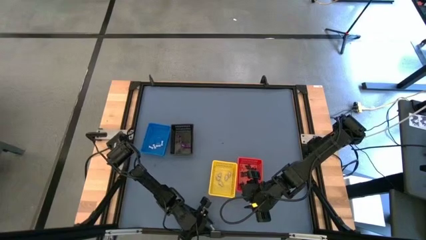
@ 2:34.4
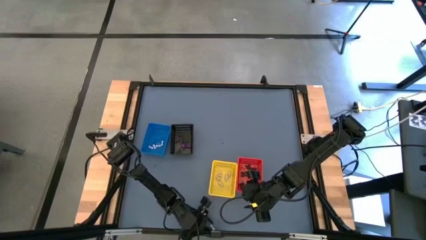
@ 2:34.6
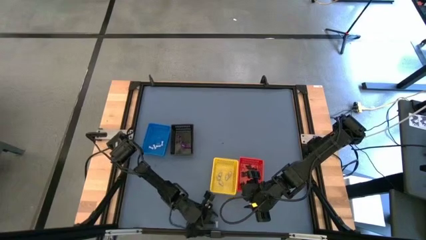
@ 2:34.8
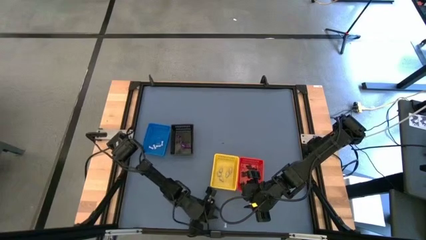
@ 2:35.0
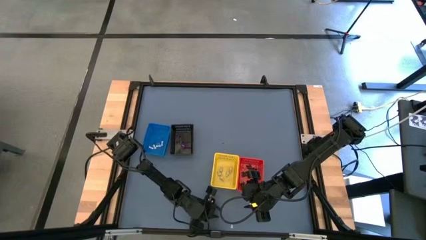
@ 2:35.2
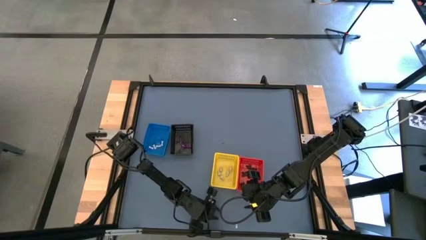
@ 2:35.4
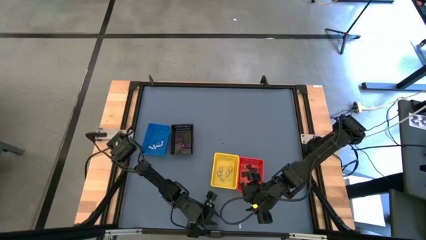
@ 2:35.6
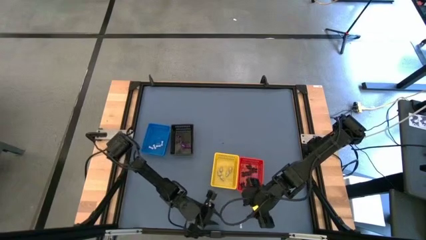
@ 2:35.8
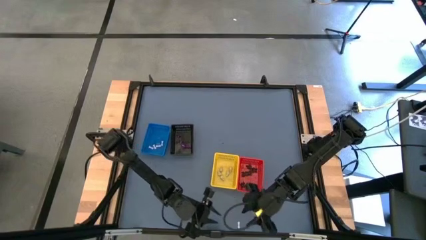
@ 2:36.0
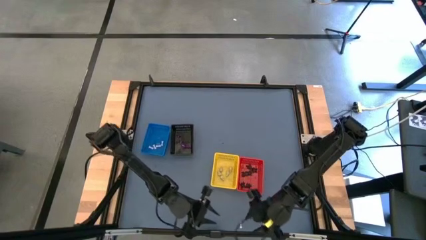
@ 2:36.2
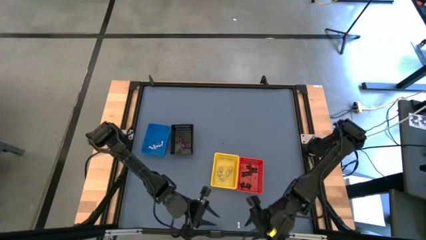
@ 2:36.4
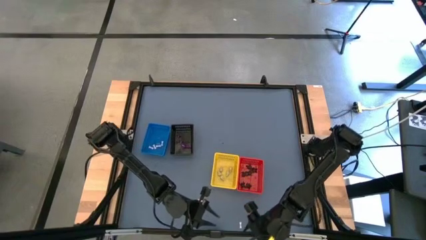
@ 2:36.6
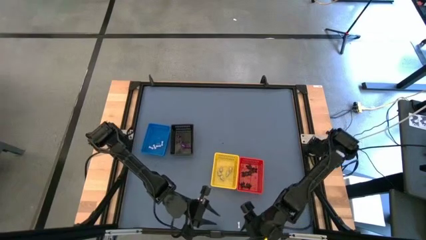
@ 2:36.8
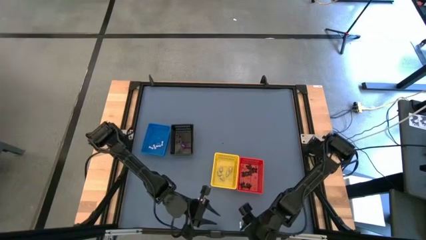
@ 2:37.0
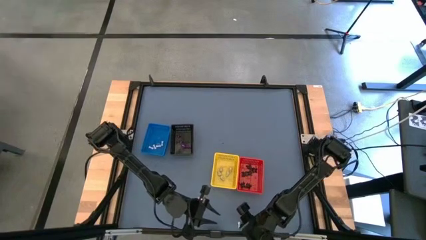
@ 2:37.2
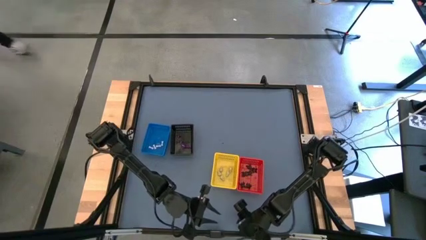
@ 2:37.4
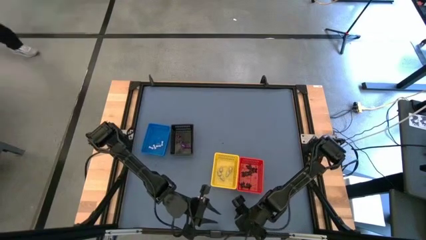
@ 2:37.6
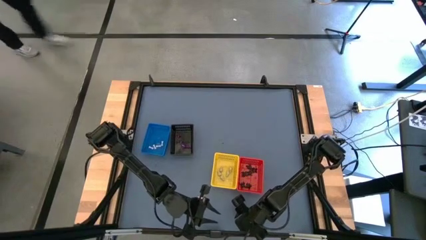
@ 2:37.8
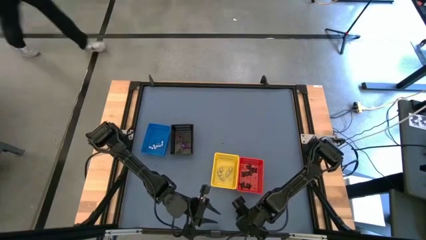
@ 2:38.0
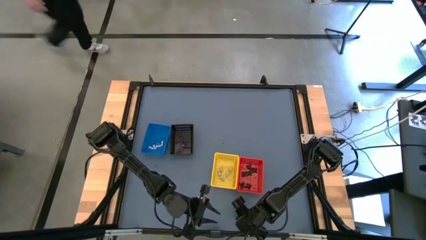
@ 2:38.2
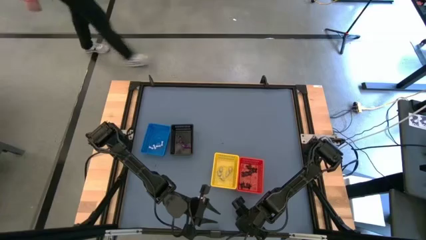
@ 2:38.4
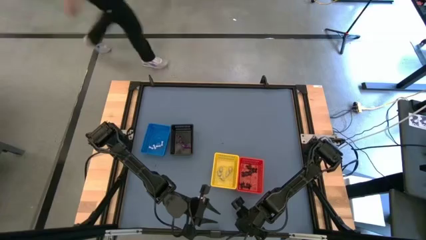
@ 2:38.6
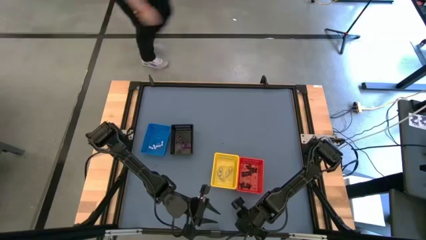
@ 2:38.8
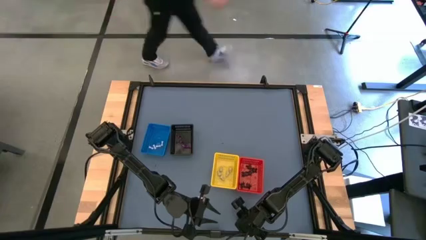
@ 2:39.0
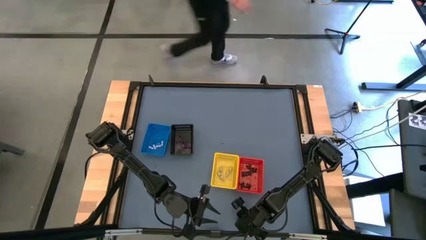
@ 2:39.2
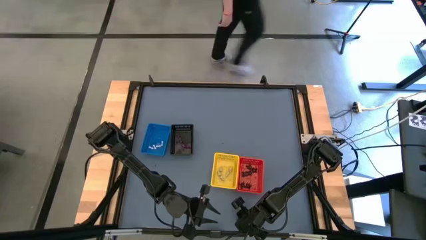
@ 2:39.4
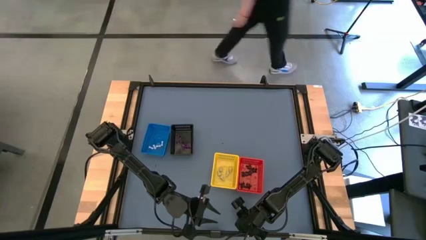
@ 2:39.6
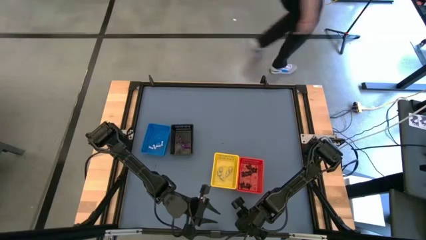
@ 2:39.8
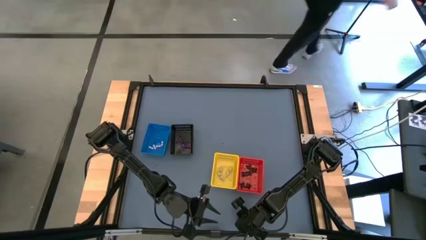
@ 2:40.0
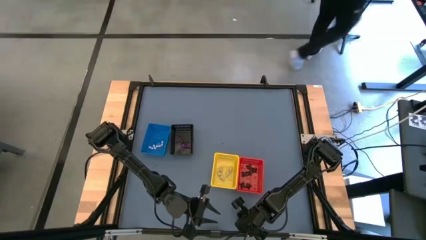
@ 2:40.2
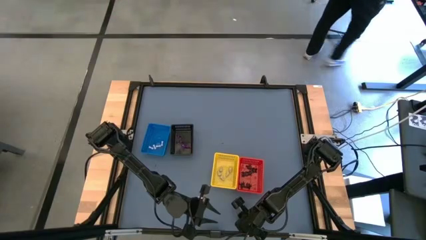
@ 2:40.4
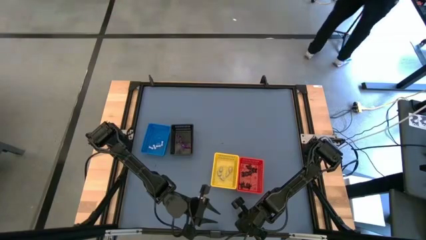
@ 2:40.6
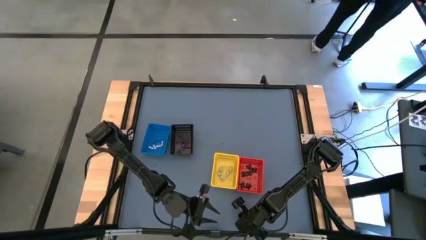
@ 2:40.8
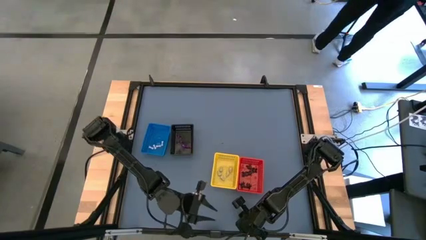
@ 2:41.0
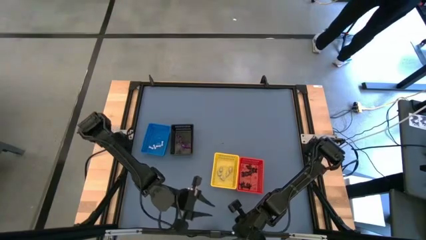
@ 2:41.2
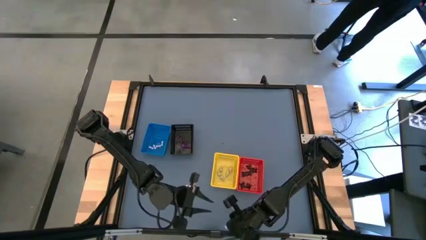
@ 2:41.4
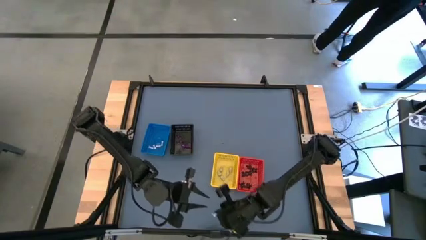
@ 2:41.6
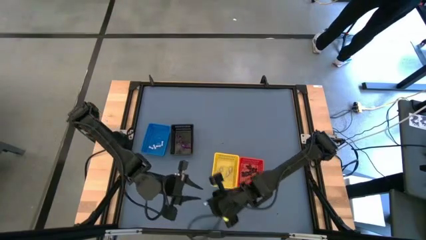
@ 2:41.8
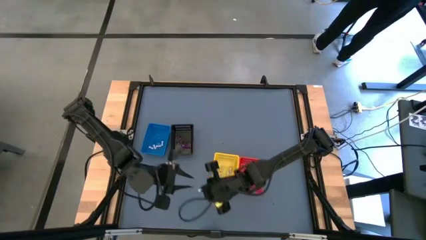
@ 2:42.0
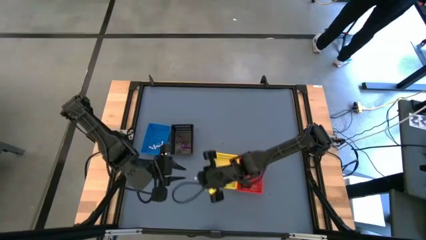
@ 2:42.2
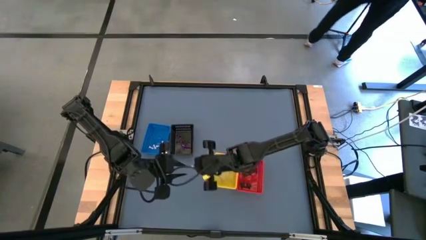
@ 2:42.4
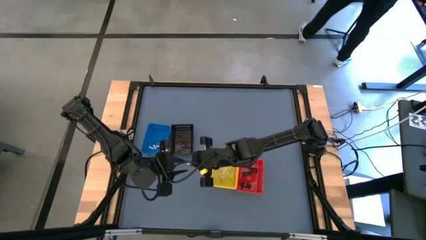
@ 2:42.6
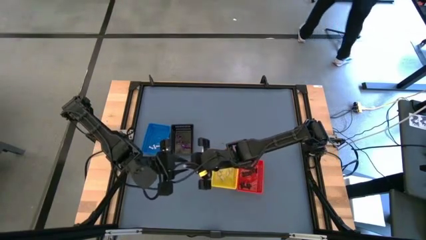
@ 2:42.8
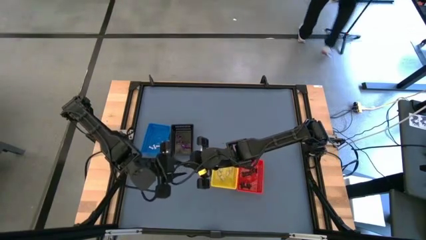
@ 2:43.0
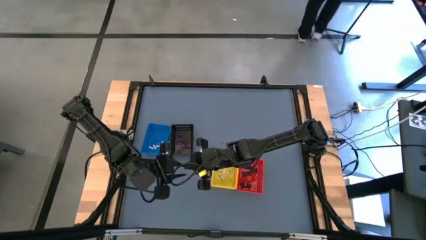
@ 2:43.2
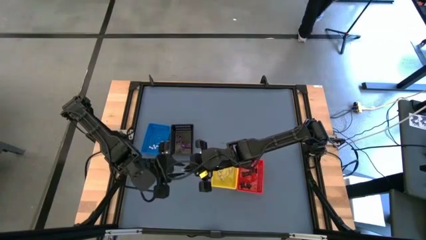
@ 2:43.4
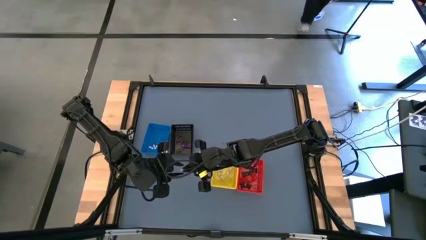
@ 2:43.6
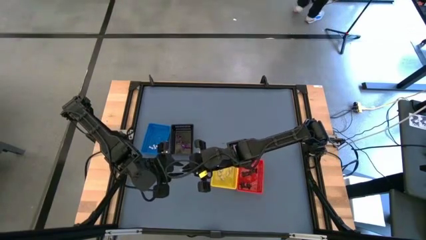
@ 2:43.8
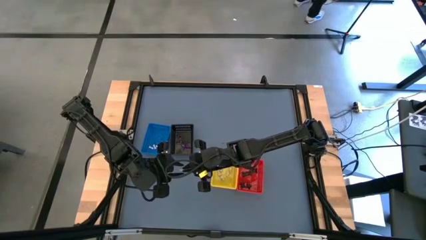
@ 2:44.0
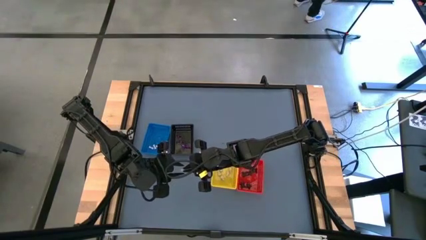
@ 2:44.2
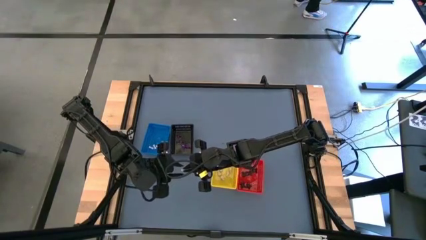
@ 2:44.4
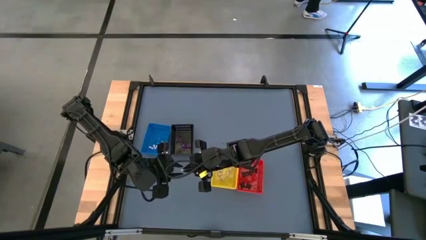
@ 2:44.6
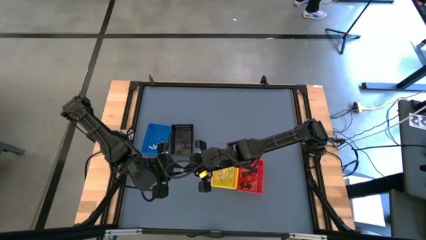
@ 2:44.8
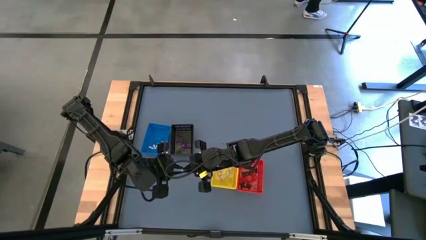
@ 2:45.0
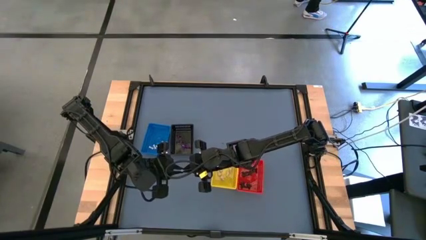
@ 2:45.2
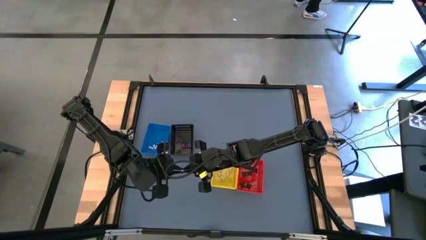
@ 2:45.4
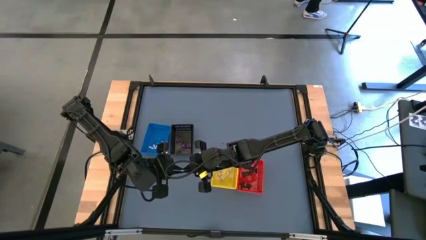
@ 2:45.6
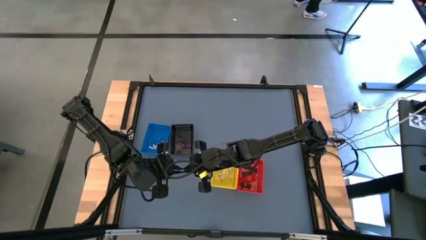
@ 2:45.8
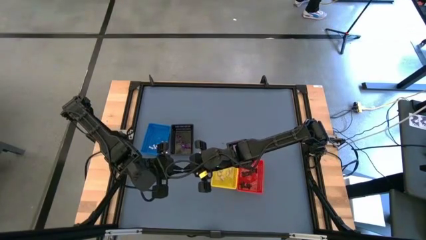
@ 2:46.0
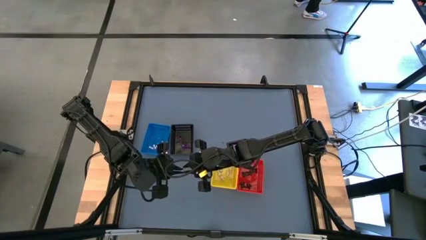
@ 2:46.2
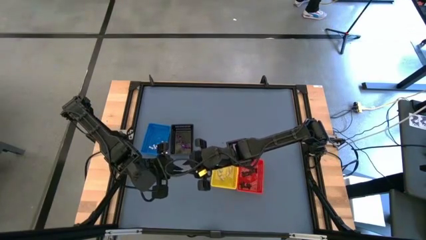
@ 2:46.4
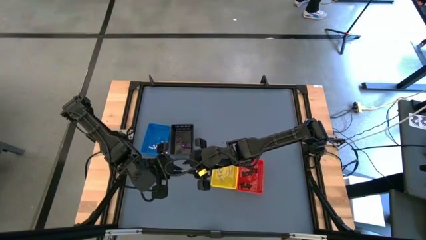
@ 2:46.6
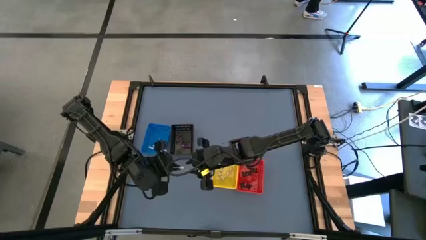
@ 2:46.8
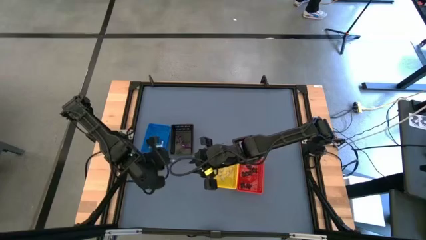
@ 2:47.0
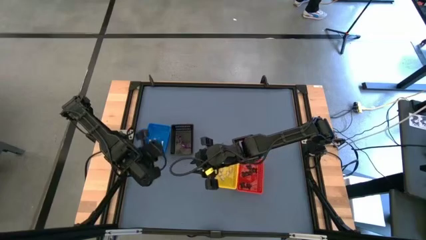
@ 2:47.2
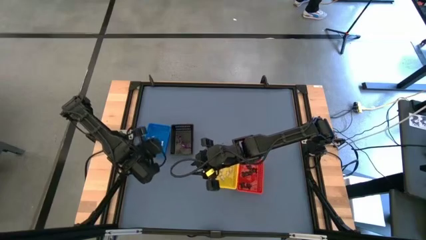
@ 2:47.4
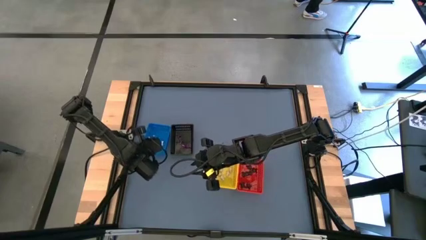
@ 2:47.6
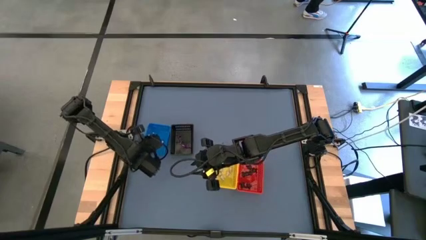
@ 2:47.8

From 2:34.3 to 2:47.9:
Task: Sort Halloween decoration
Put the bone toy into the blue bin
